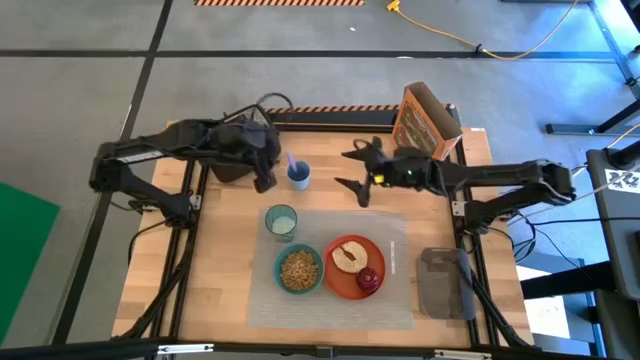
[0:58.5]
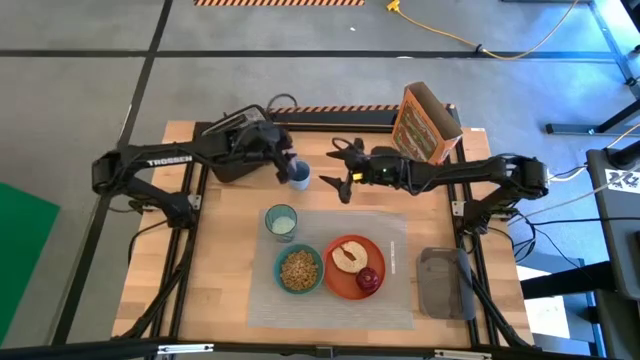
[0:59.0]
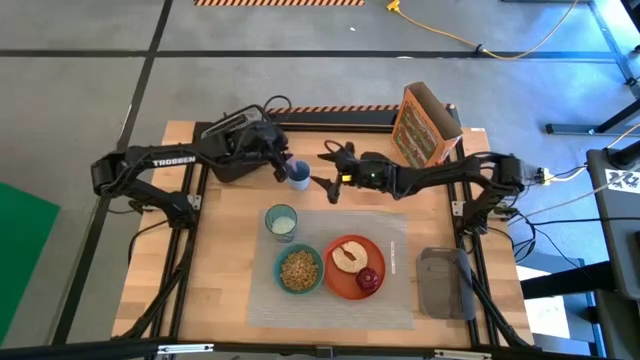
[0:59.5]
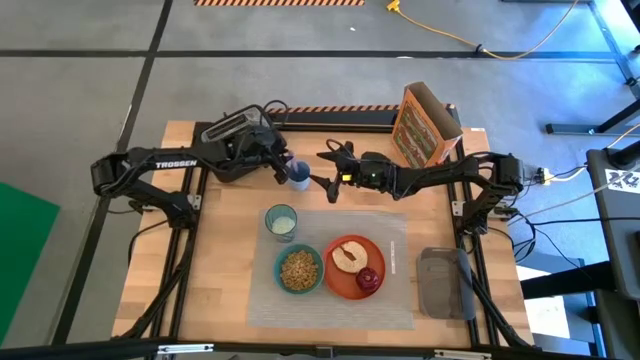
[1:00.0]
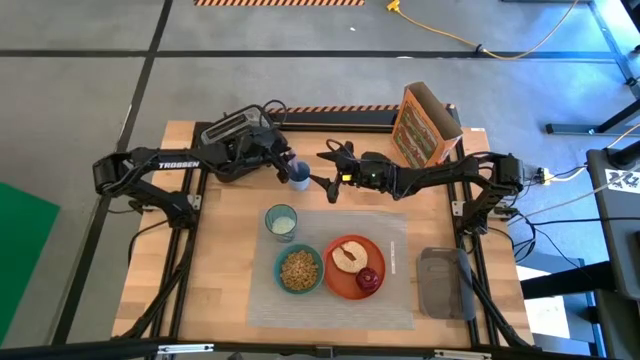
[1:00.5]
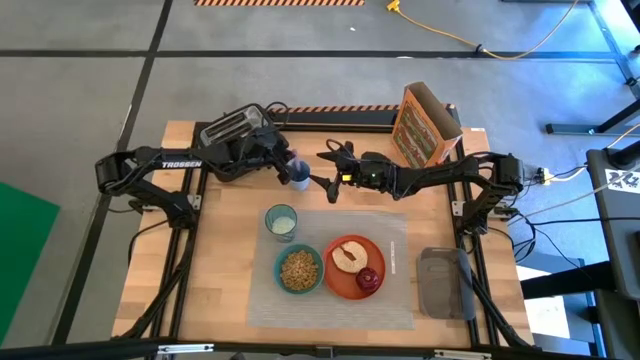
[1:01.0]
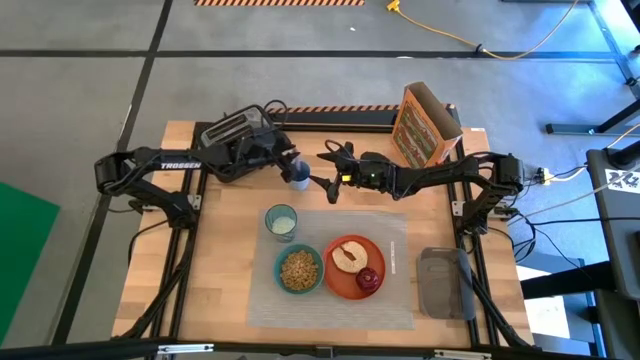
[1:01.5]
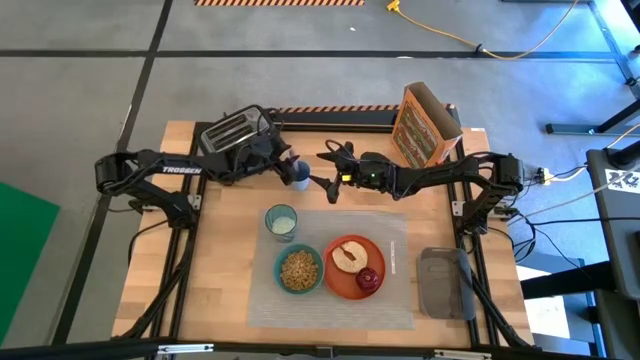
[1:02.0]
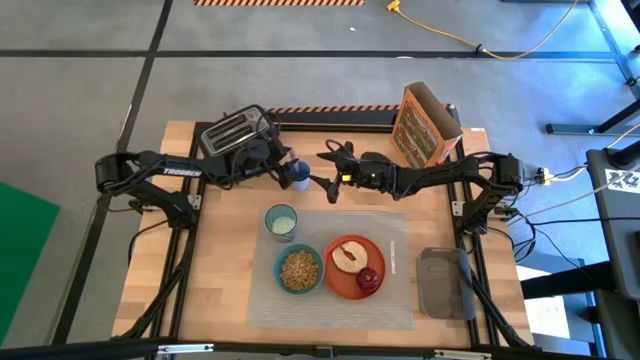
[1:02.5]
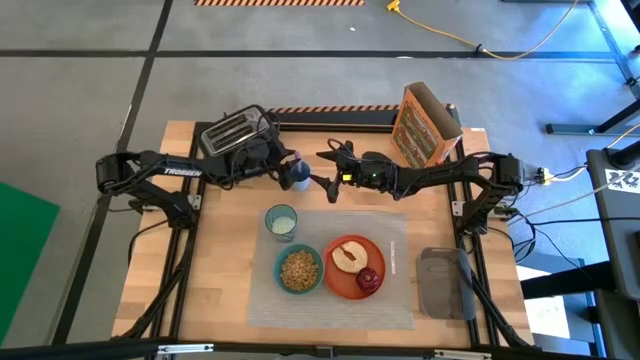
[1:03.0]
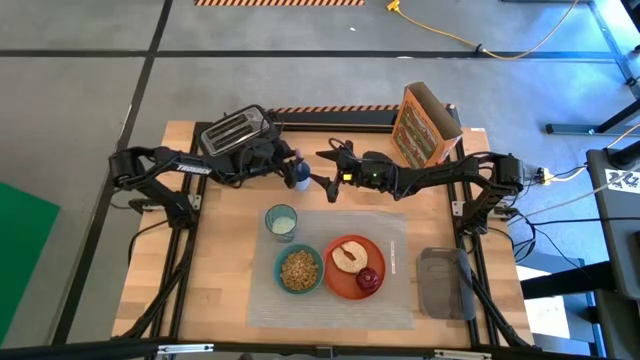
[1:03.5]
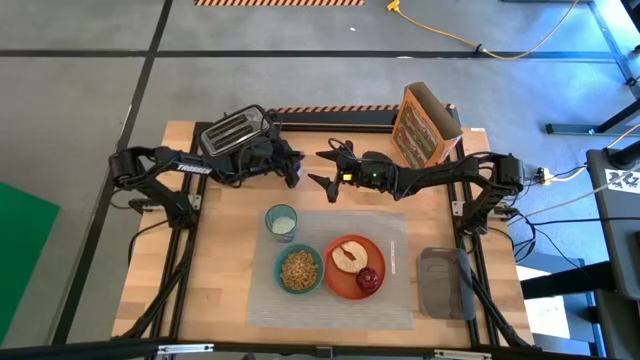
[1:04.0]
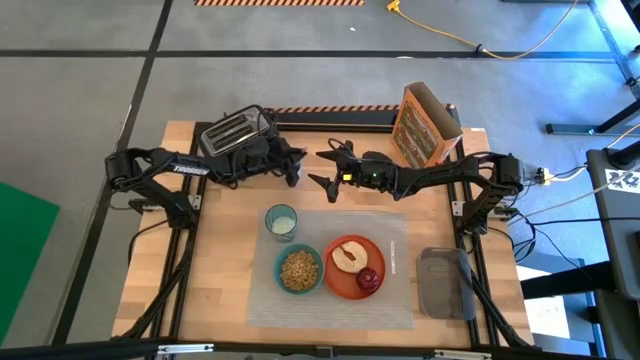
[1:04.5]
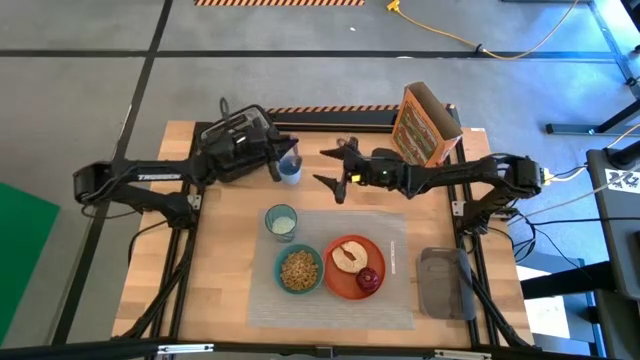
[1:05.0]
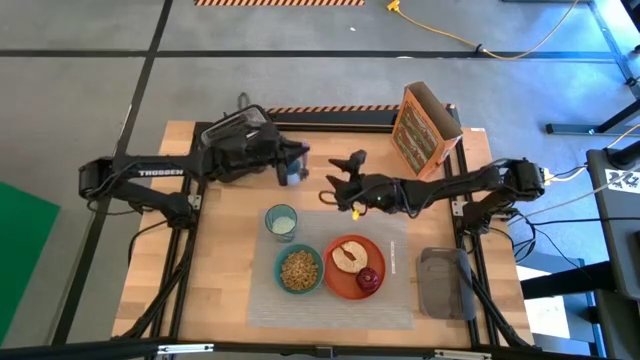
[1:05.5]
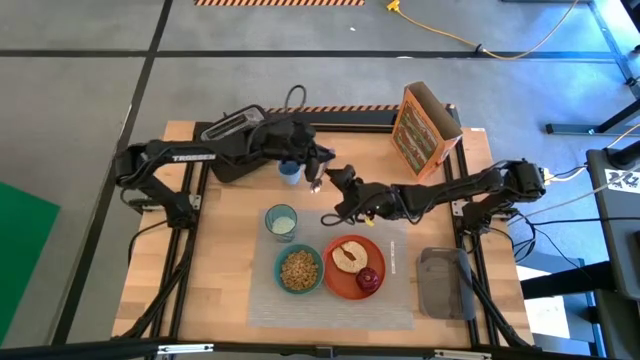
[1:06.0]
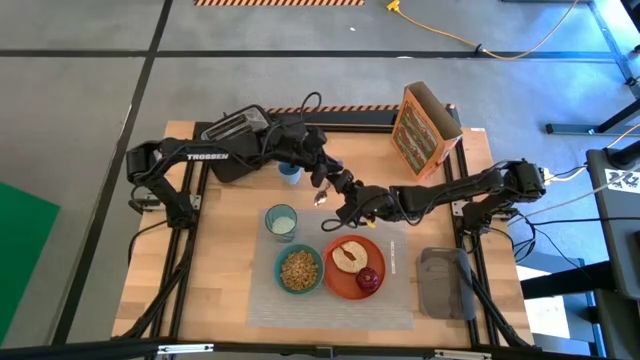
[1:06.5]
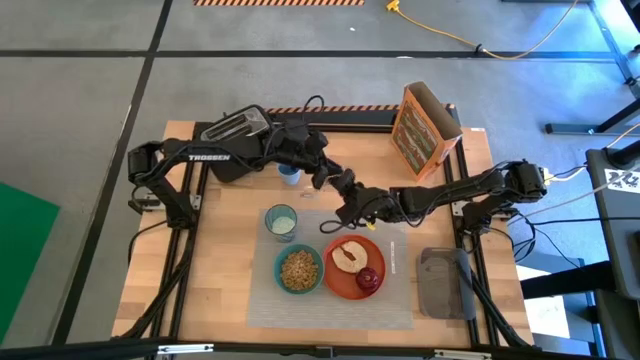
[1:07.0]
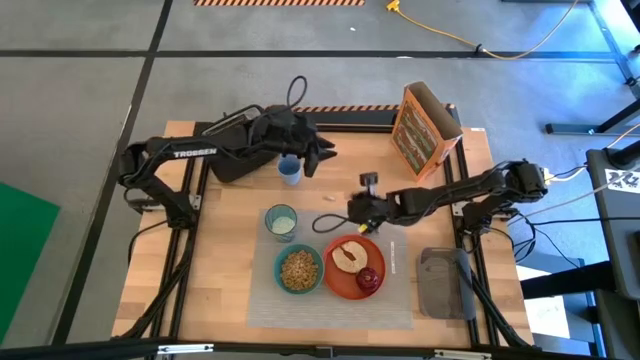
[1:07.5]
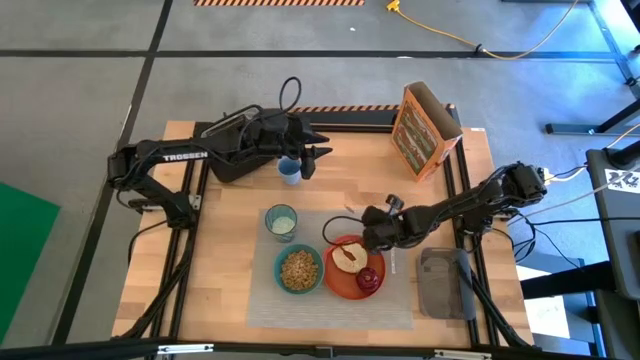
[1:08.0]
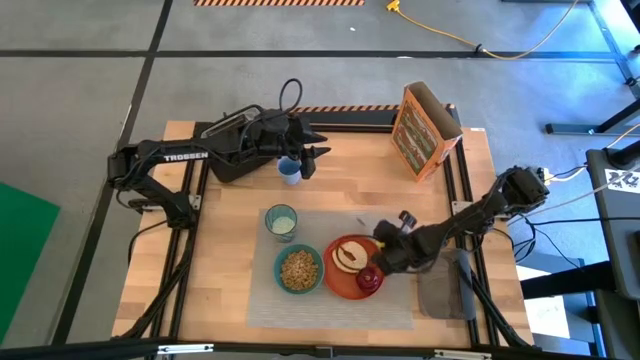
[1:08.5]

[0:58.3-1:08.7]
Task: Arrange a breakfast setting
Put the purple spoon on the top right of the table mat

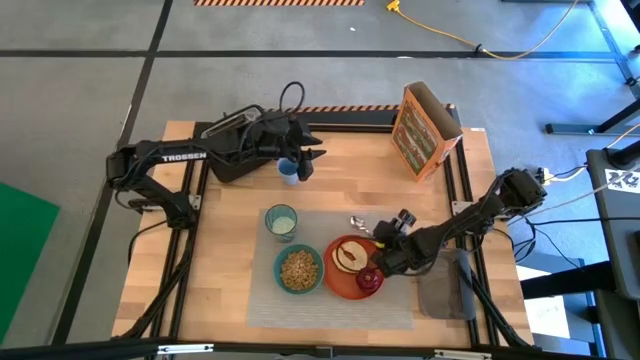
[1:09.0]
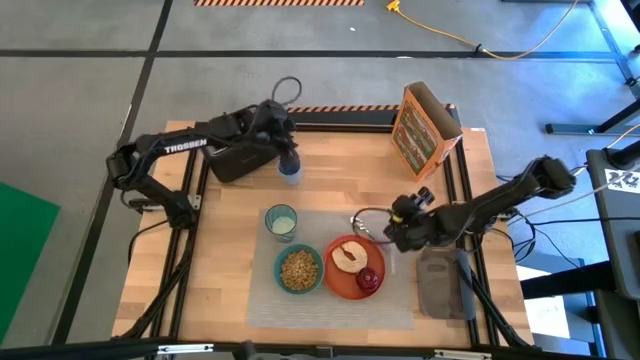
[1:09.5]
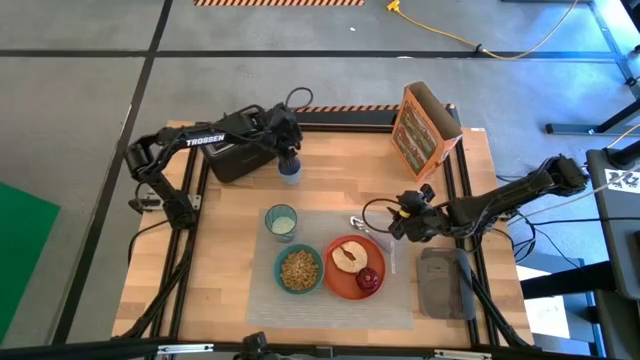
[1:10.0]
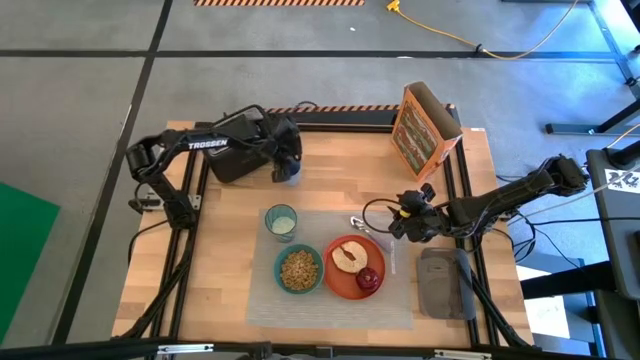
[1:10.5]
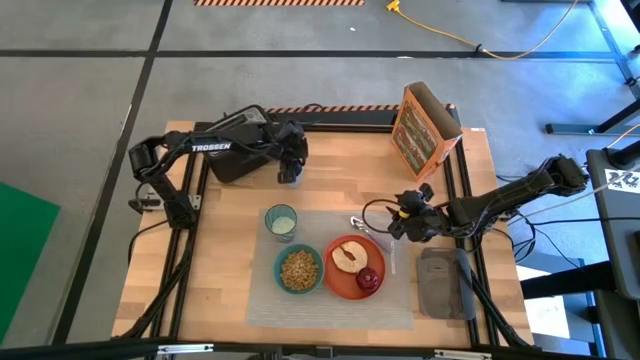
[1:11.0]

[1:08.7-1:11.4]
Adjust the blue cup

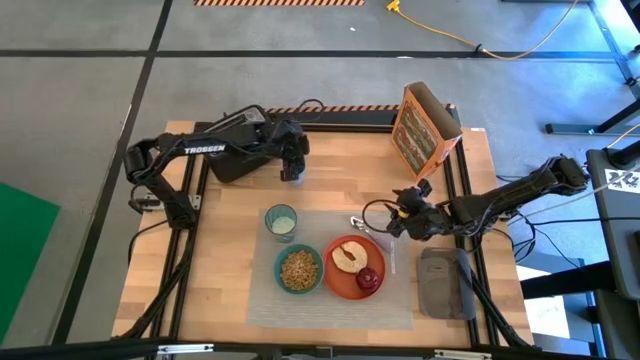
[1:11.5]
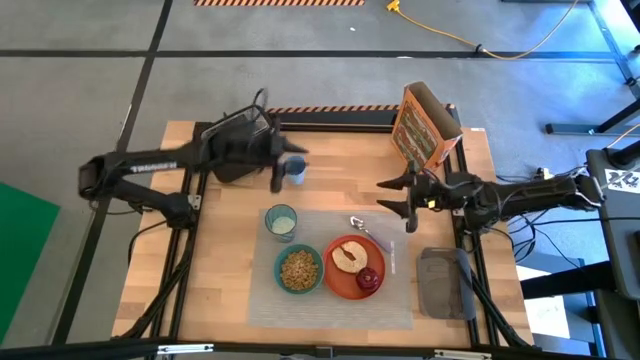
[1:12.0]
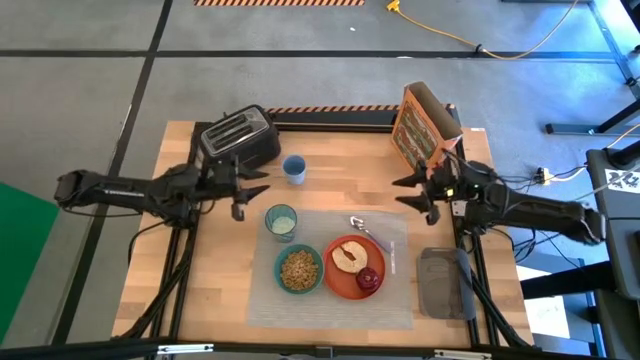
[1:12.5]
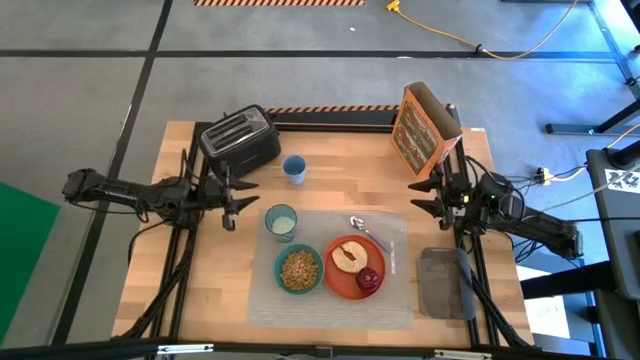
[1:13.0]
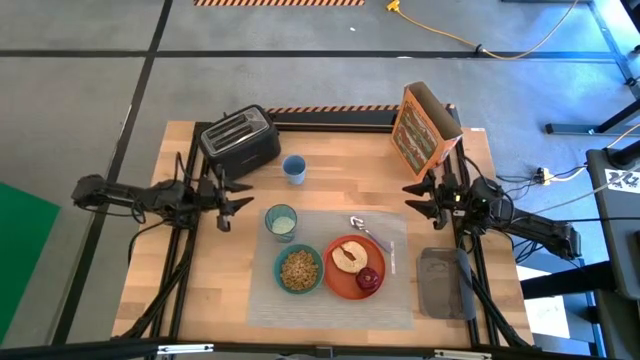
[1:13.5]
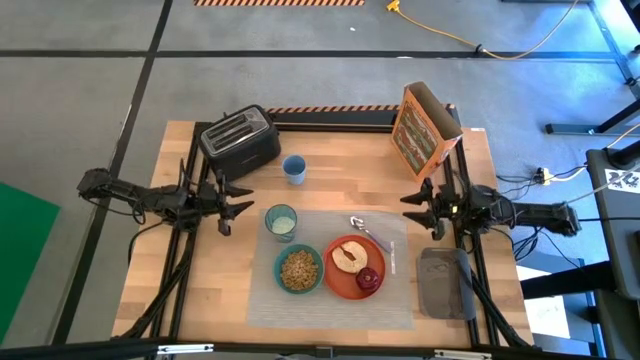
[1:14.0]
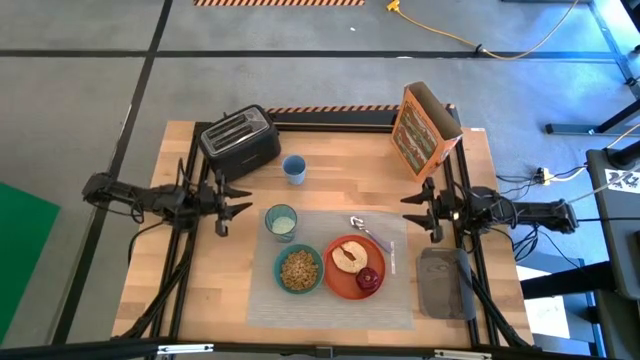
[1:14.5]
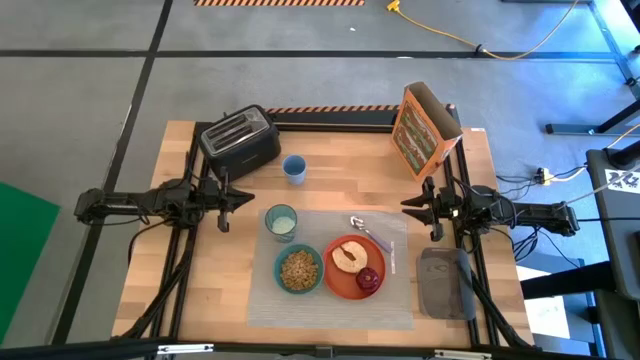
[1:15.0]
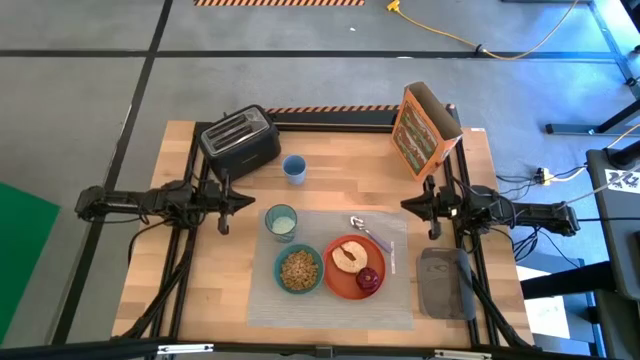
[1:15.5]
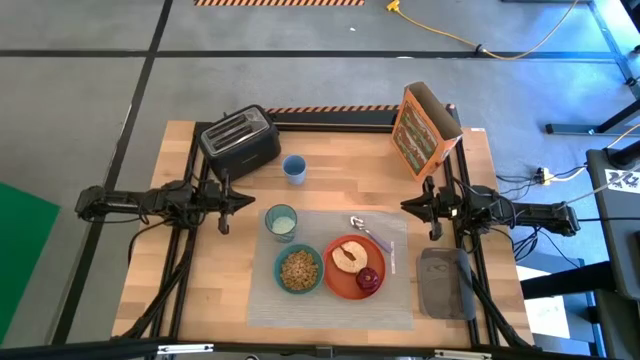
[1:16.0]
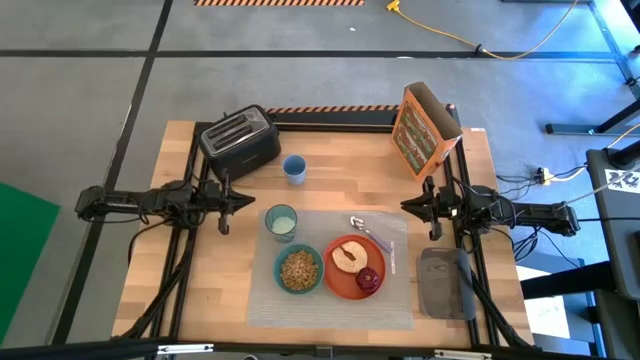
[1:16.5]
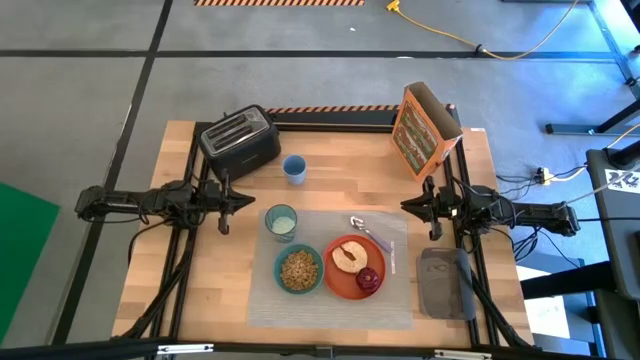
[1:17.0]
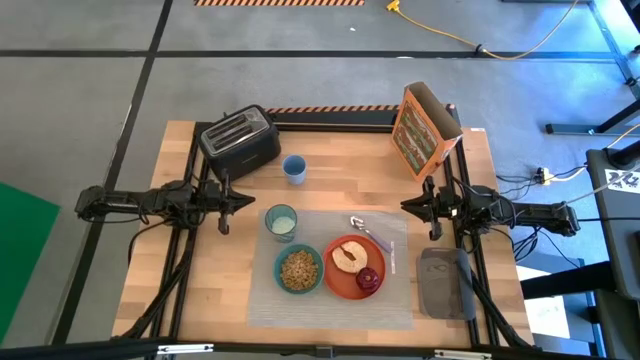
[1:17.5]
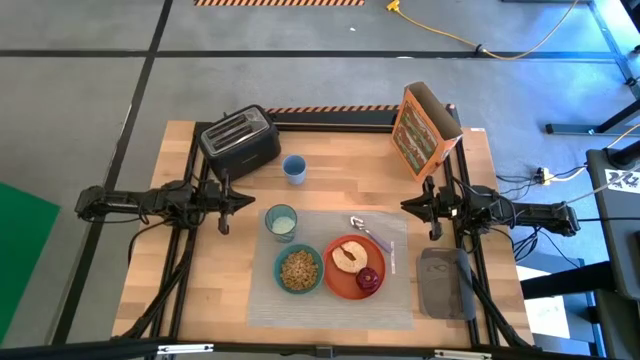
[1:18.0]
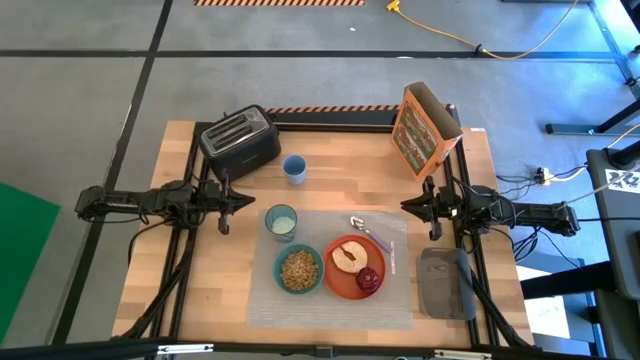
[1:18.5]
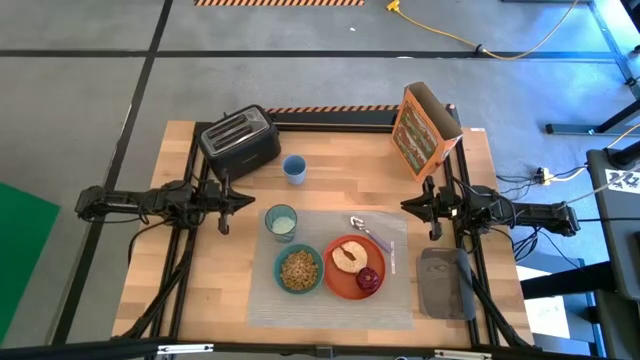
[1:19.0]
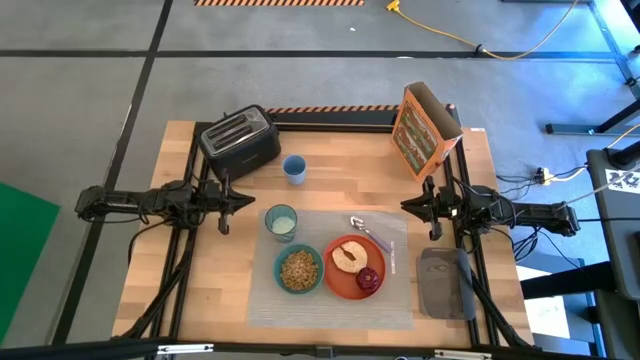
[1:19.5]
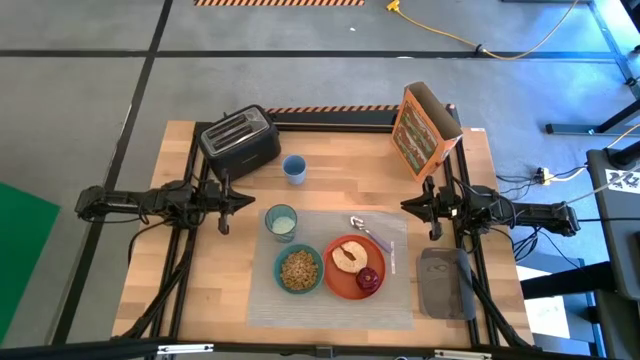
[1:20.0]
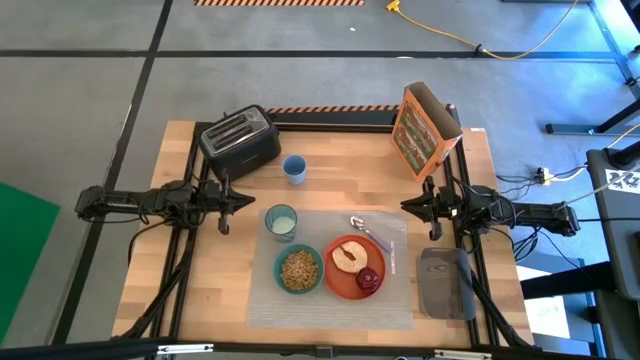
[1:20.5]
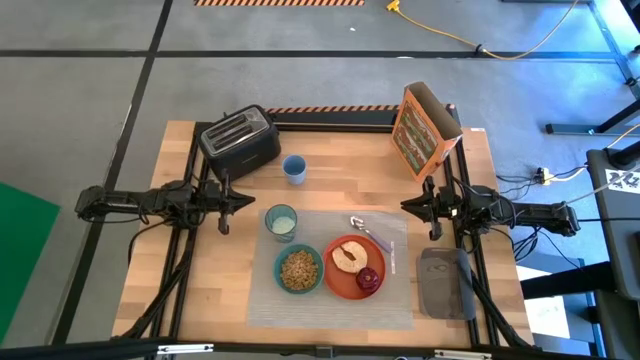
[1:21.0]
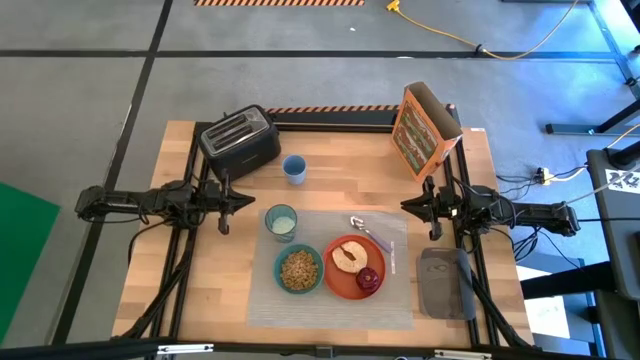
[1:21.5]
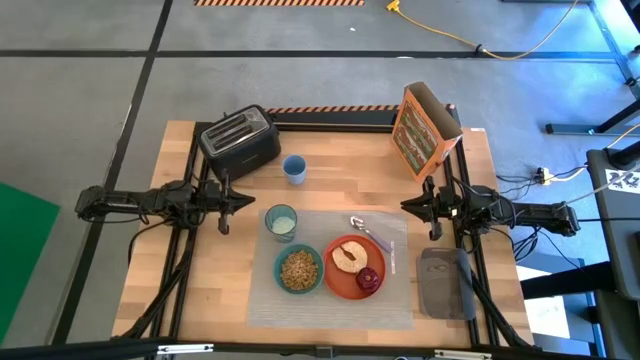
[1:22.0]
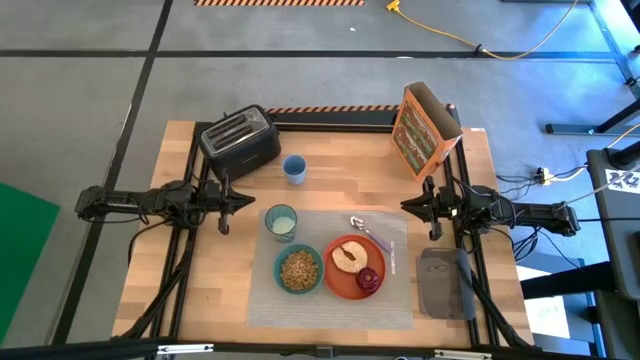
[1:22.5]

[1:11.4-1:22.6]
Return to Home Position
